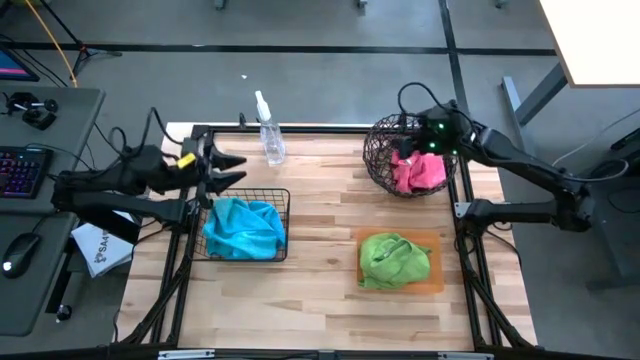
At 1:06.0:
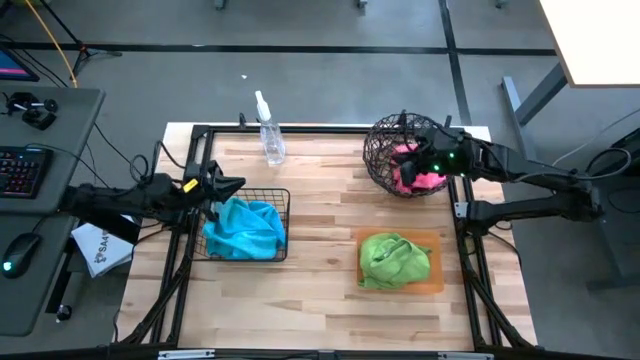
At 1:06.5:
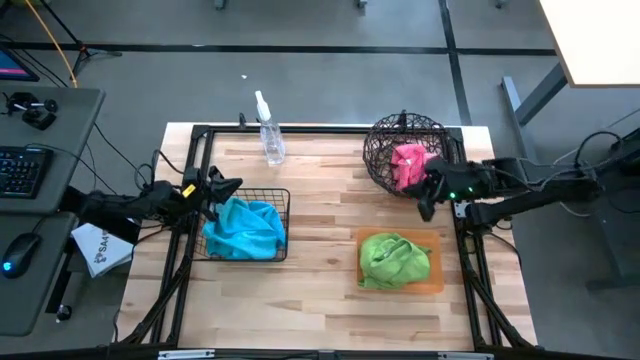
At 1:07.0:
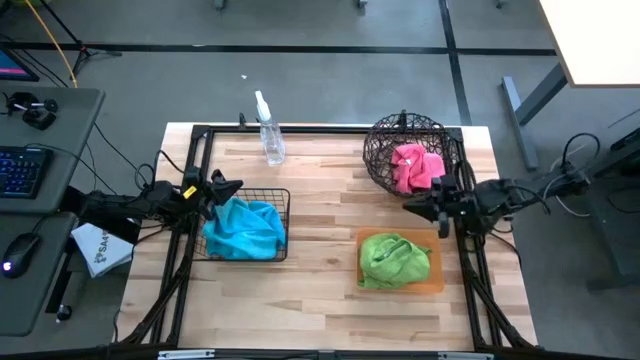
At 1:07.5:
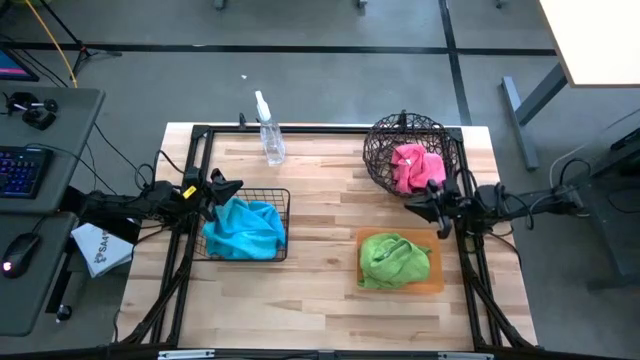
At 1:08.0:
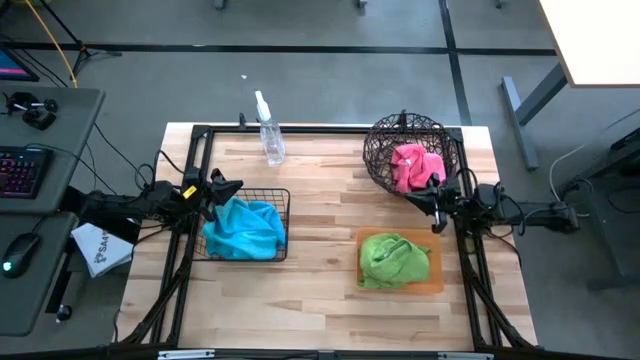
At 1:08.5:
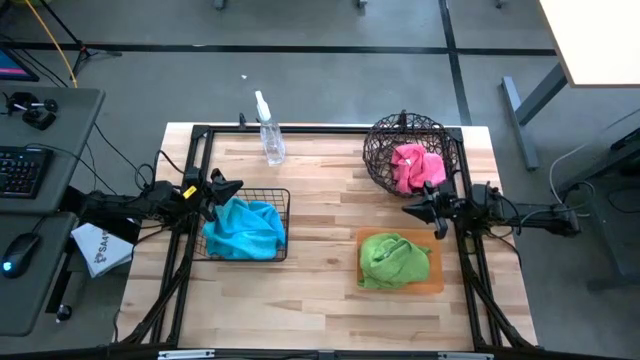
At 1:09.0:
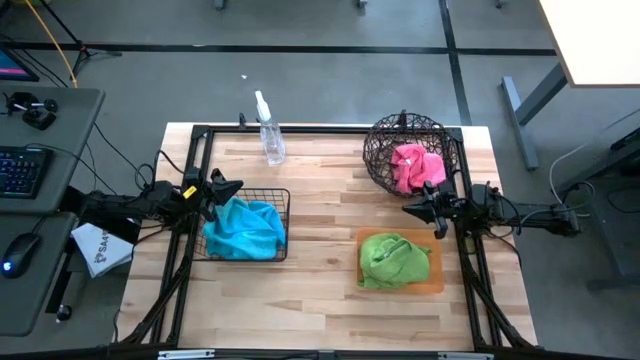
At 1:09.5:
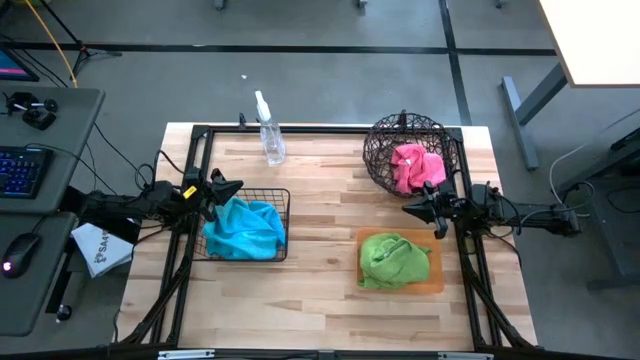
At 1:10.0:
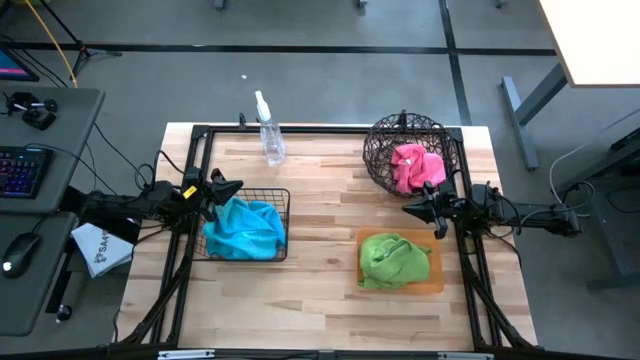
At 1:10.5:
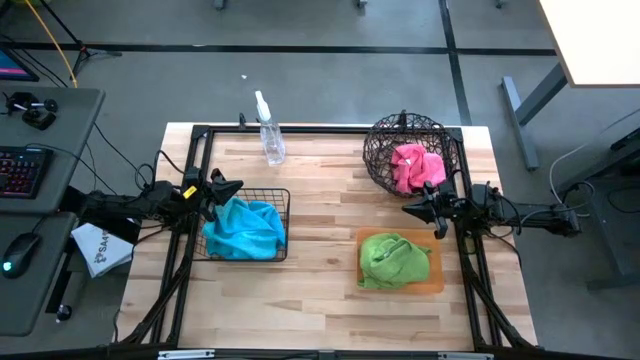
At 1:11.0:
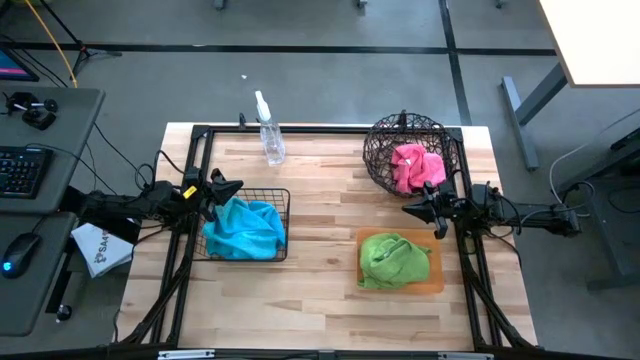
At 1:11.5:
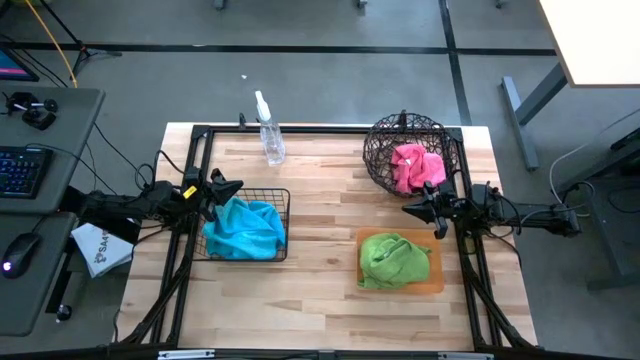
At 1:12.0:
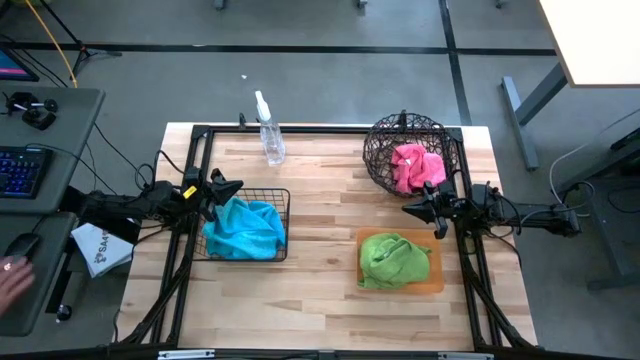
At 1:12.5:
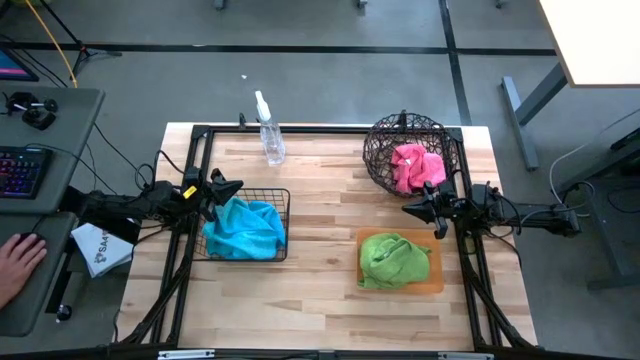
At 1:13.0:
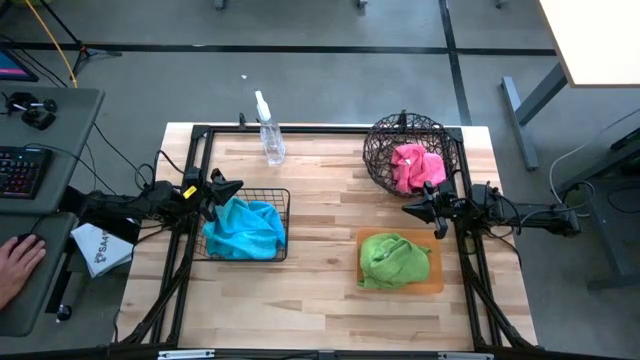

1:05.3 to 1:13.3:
Task: Sort microfiber towel by color & place in baskets
Return to Home Position

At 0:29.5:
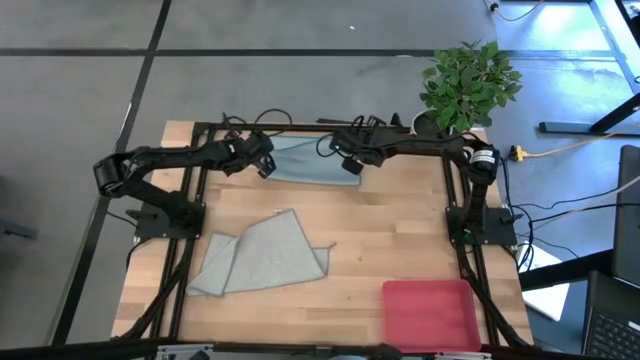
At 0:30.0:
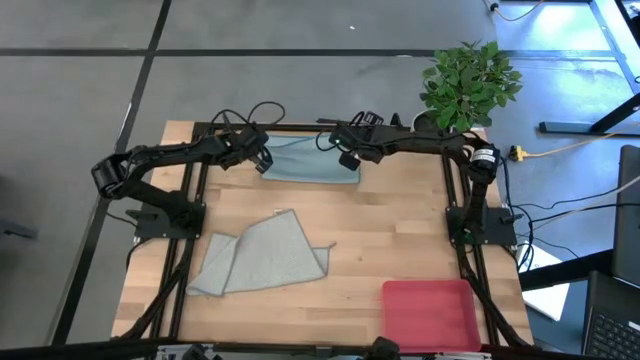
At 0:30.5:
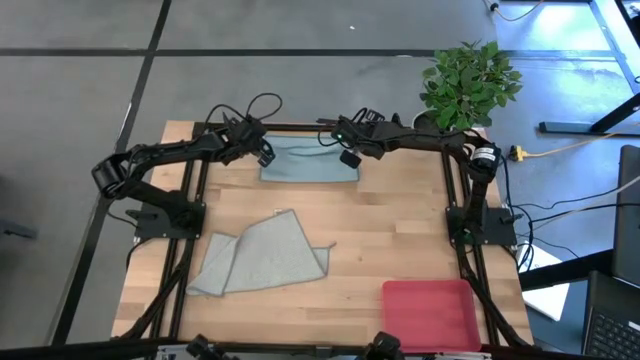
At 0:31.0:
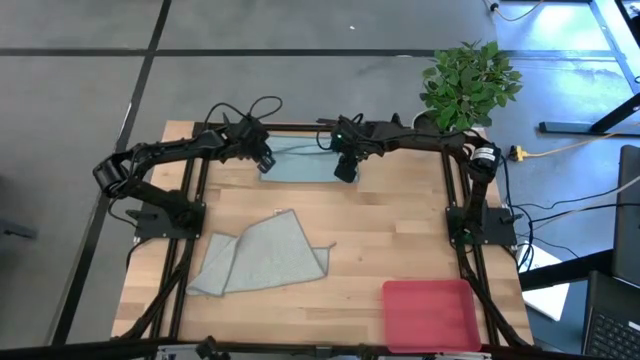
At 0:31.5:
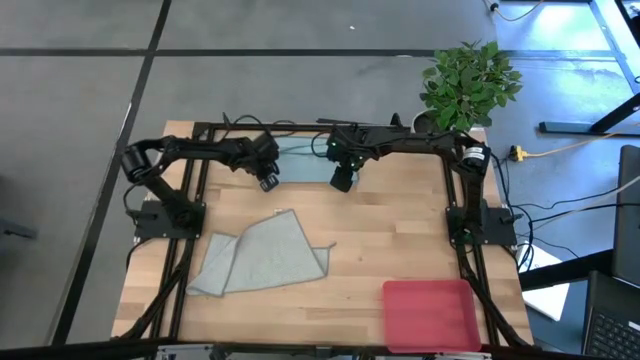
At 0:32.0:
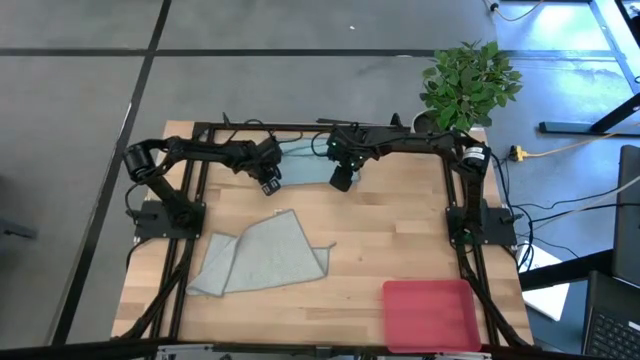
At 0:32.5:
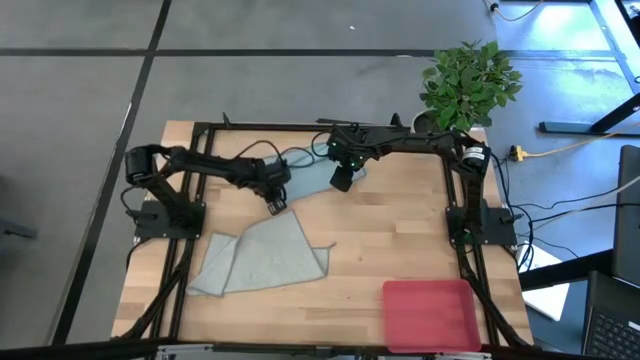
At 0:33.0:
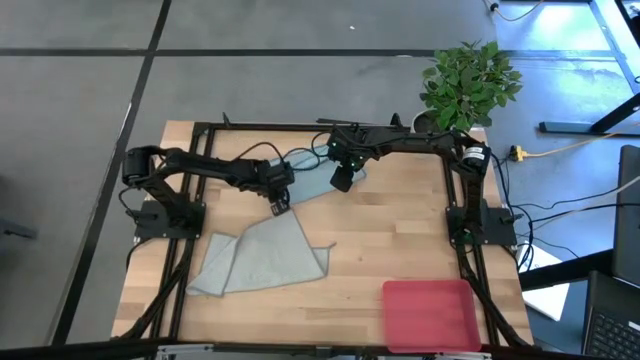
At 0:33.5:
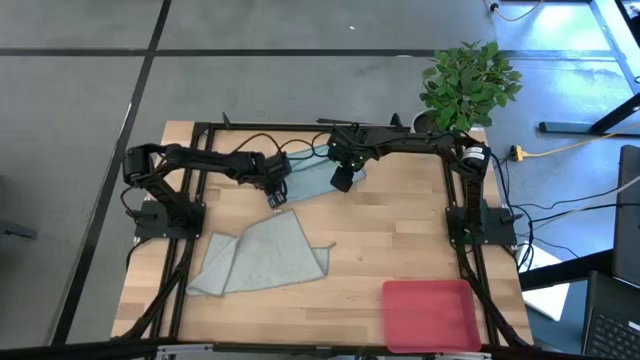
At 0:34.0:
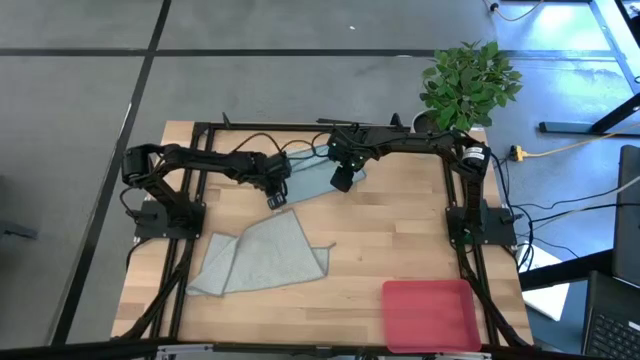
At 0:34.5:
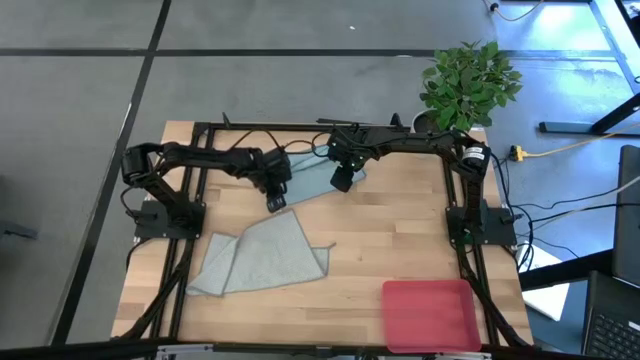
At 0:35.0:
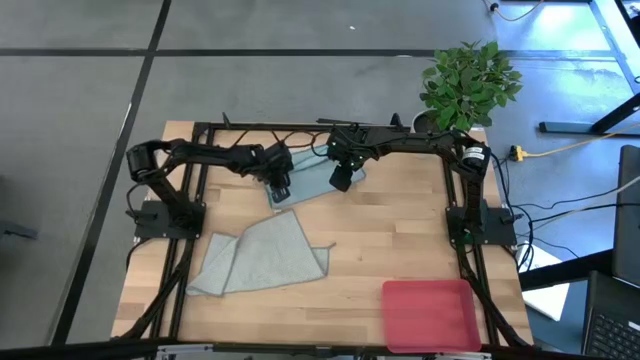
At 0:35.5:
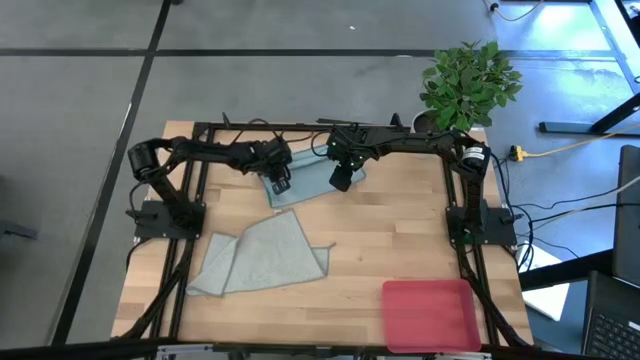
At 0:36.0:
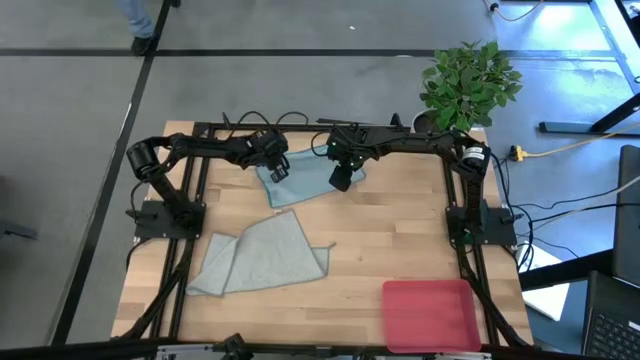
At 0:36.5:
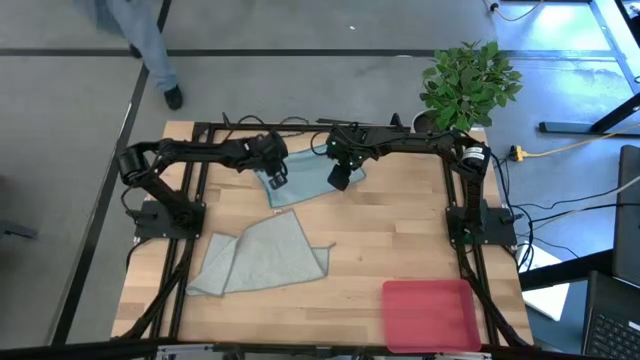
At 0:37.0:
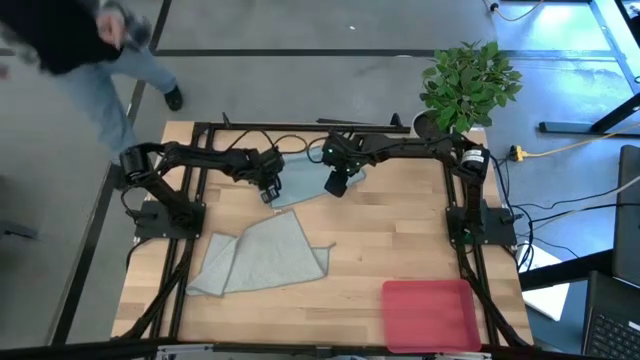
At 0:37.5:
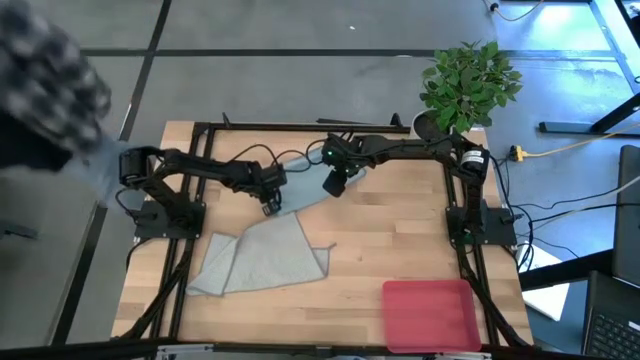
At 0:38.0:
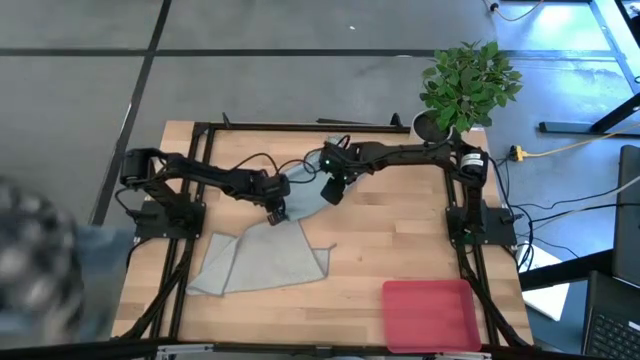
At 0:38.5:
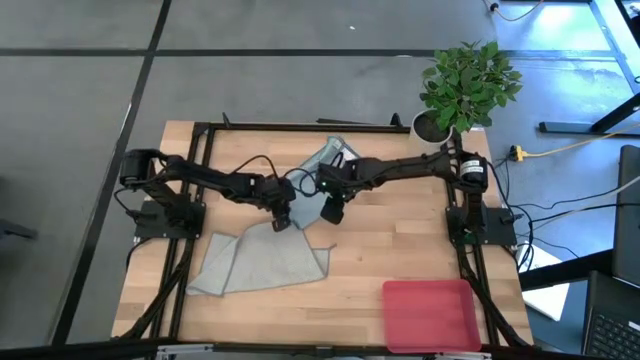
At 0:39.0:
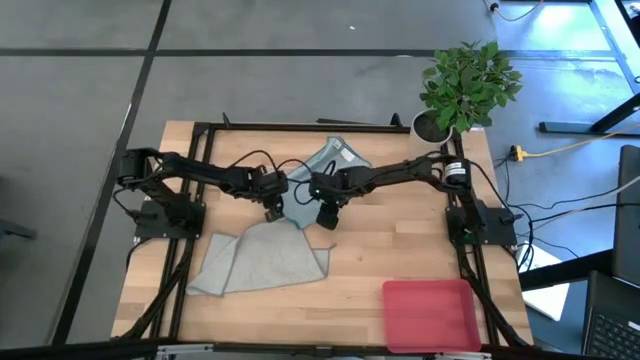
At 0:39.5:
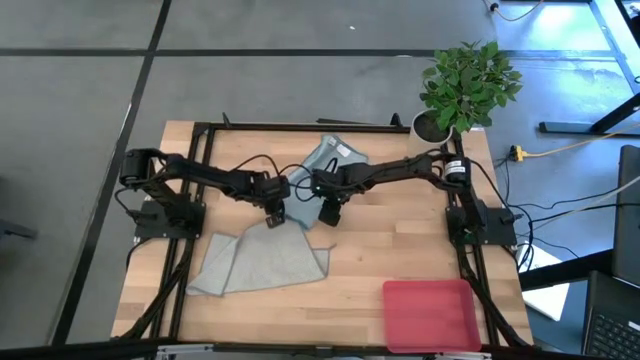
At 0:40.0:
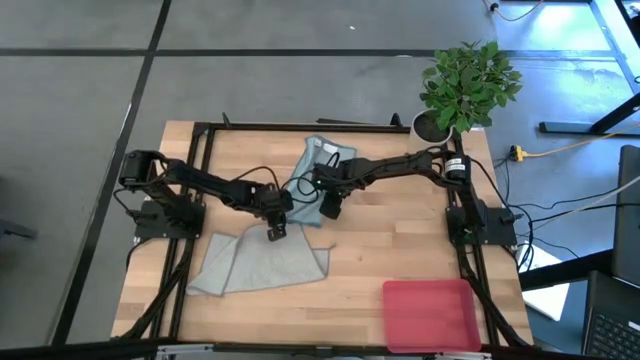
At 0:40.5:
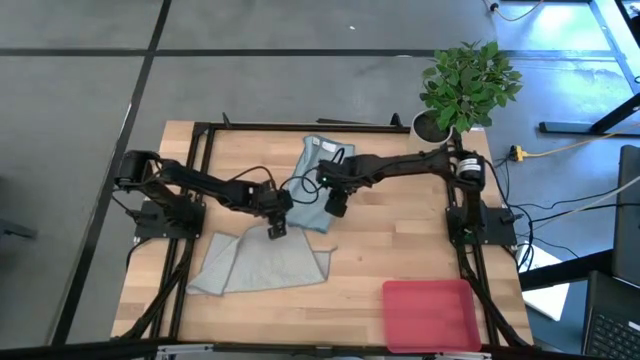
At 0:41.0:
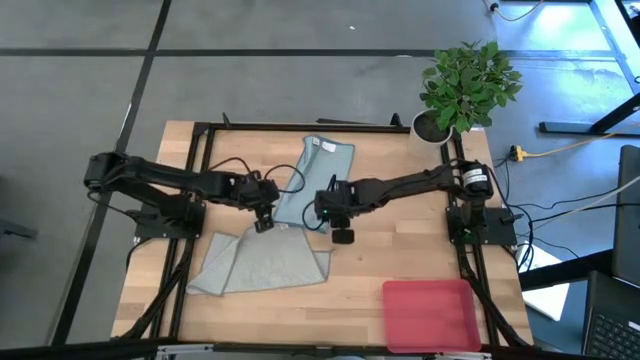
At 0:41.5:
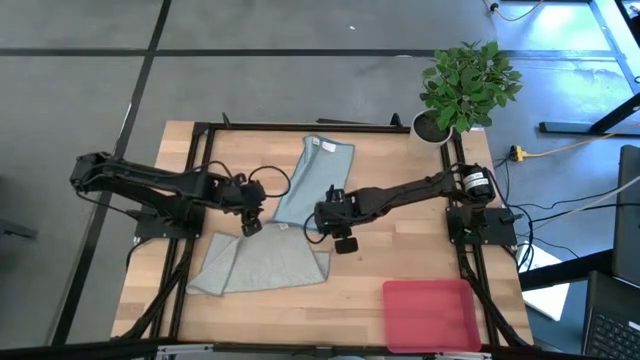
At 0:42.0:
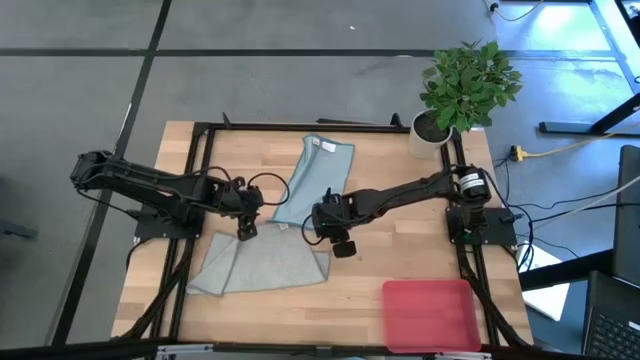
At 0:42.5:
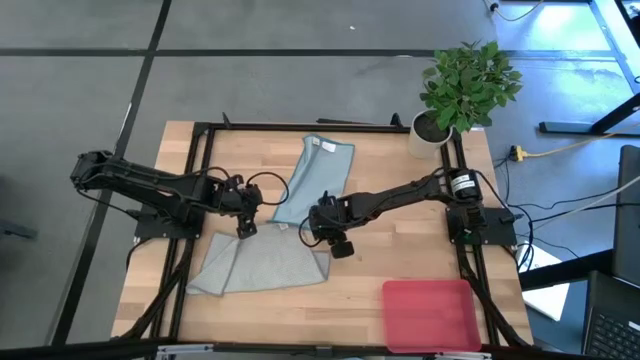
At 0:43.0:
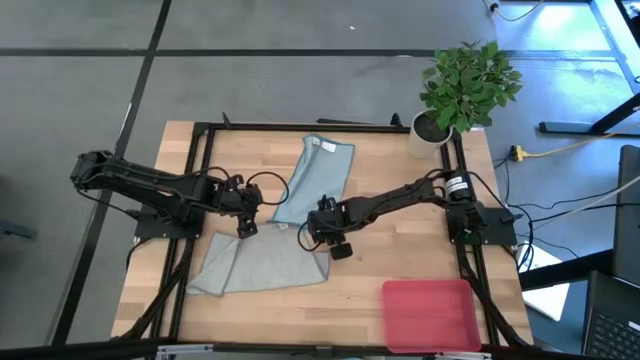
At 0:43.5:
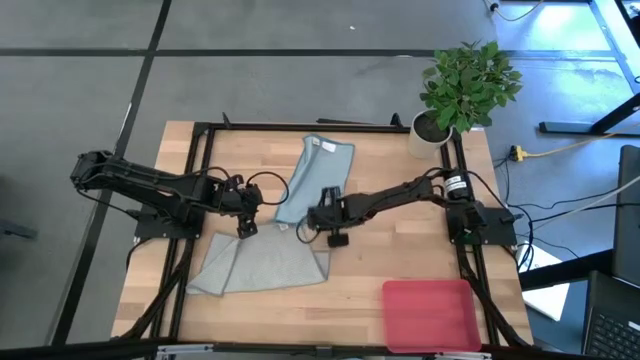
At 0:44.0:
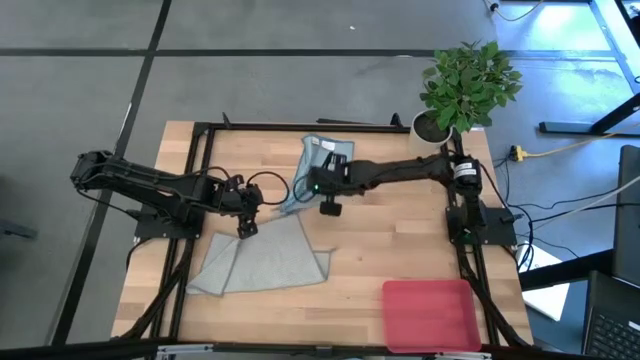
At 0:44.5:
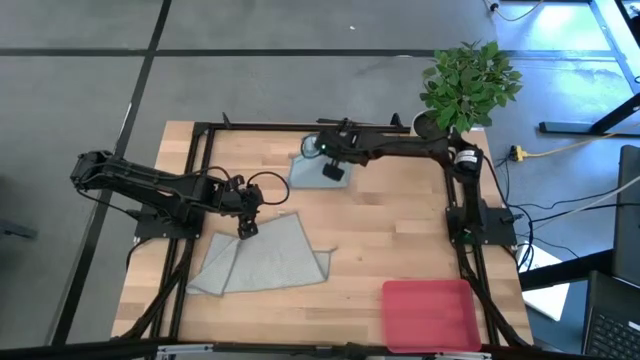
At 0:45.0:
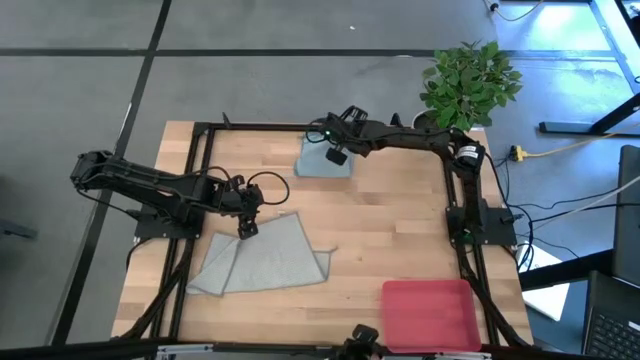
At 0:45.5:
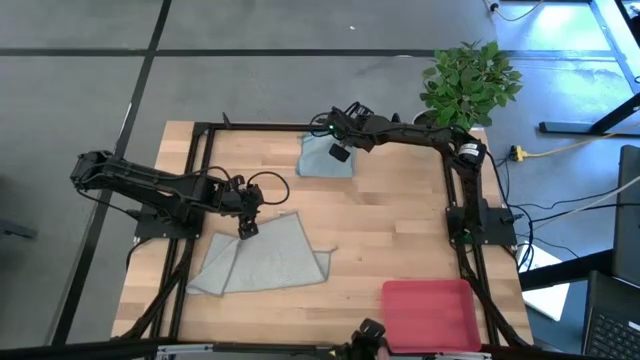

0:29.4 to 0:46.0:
Task: Roll microfiber towels into tight, uniform cylinder then place into a basket
Fold the blue towel
